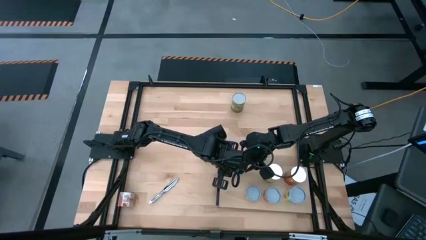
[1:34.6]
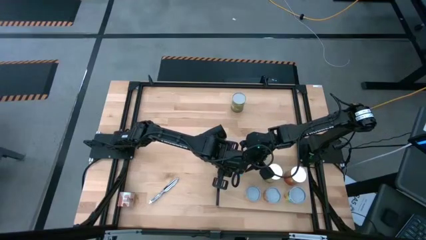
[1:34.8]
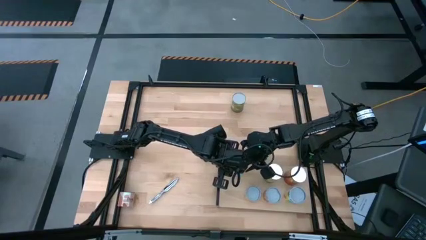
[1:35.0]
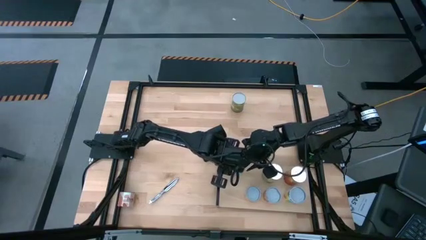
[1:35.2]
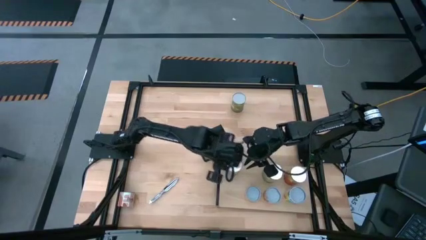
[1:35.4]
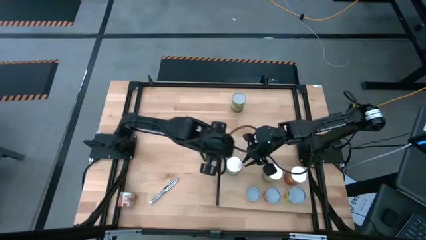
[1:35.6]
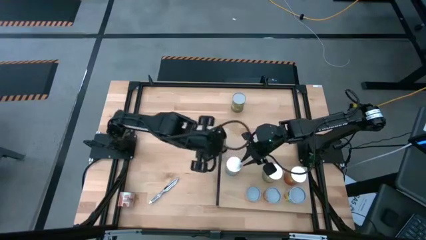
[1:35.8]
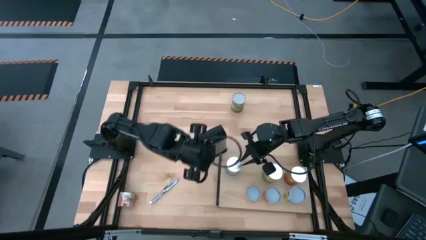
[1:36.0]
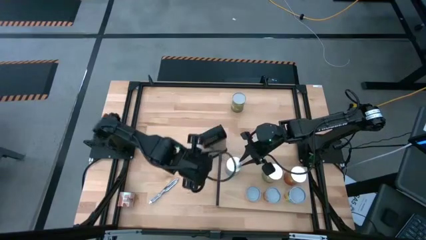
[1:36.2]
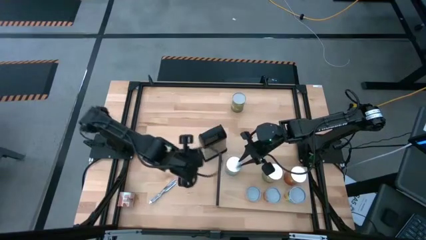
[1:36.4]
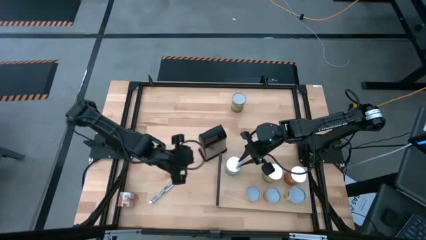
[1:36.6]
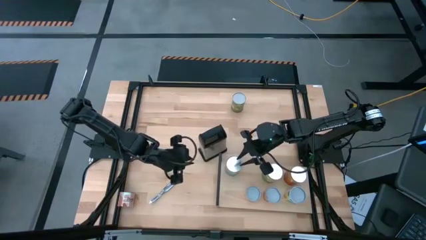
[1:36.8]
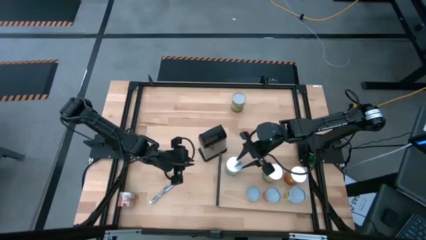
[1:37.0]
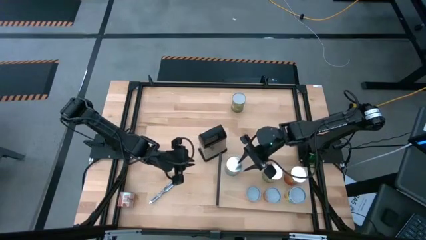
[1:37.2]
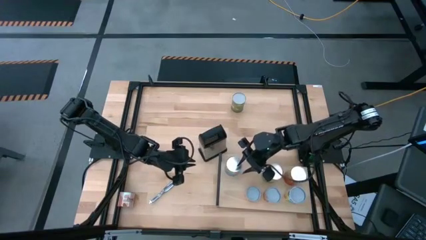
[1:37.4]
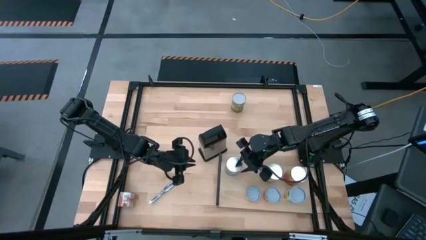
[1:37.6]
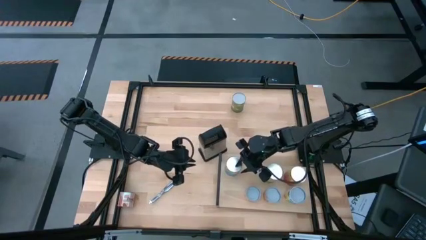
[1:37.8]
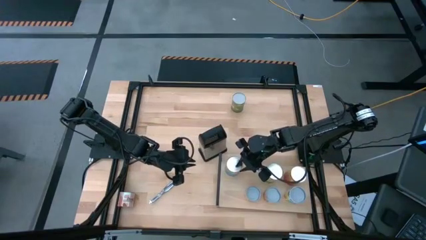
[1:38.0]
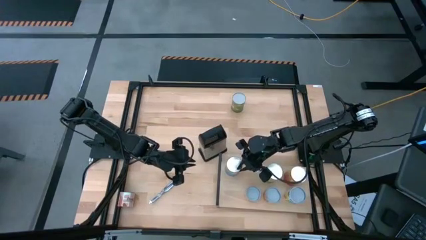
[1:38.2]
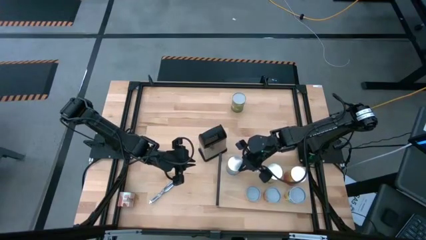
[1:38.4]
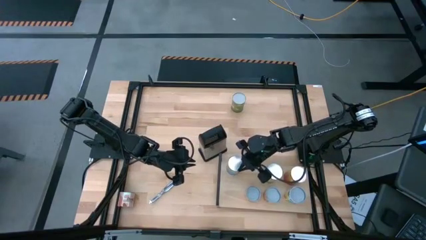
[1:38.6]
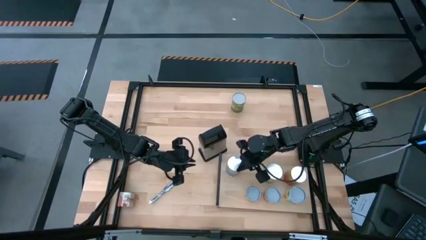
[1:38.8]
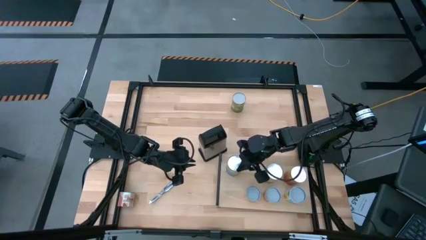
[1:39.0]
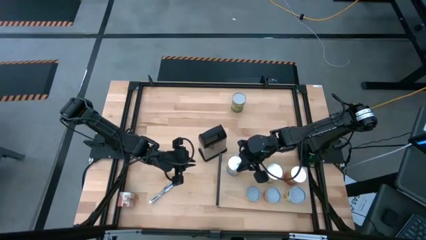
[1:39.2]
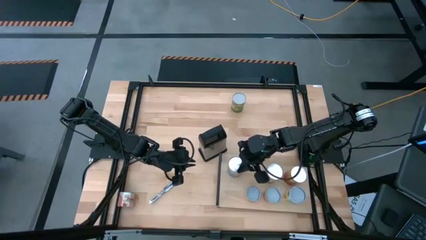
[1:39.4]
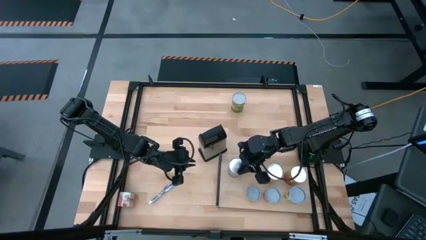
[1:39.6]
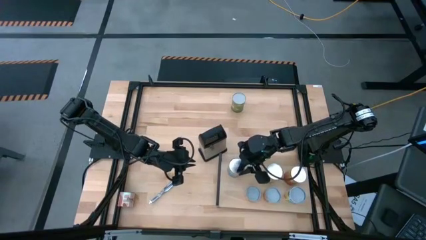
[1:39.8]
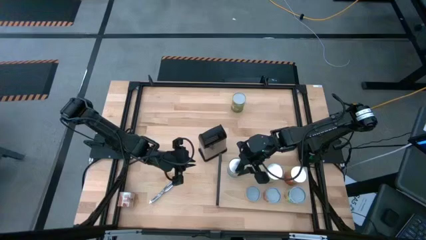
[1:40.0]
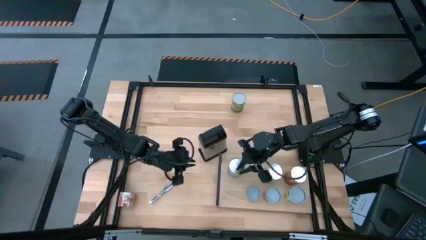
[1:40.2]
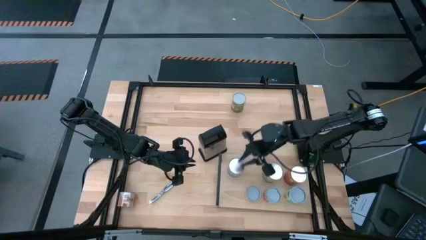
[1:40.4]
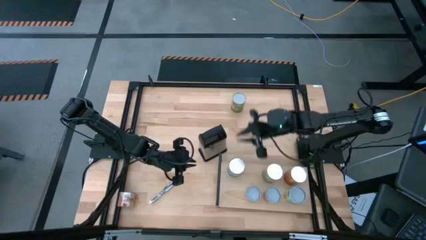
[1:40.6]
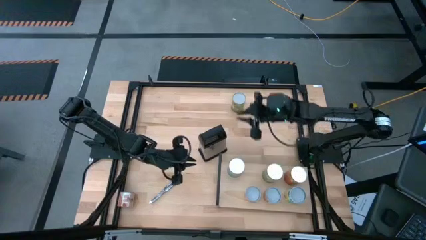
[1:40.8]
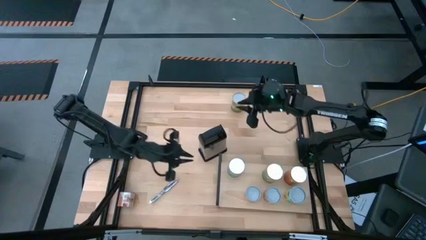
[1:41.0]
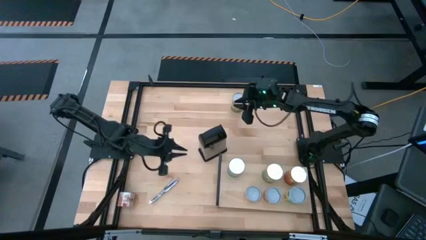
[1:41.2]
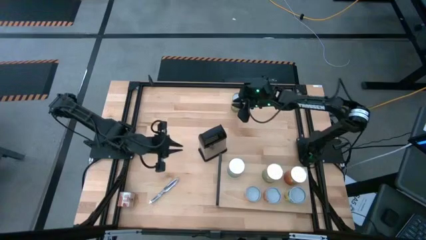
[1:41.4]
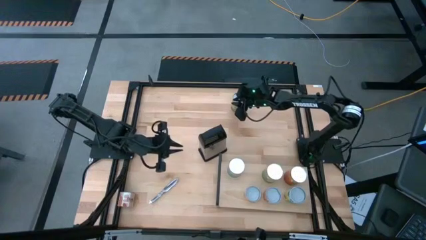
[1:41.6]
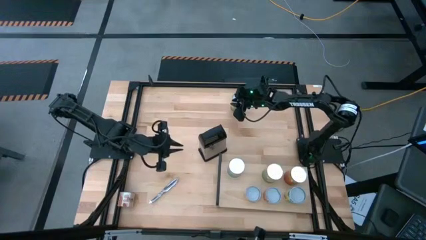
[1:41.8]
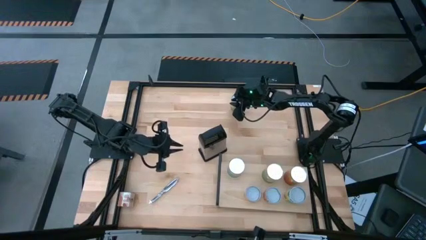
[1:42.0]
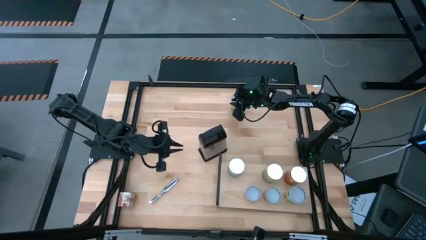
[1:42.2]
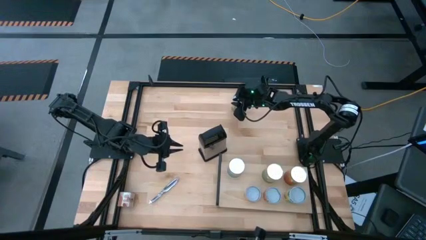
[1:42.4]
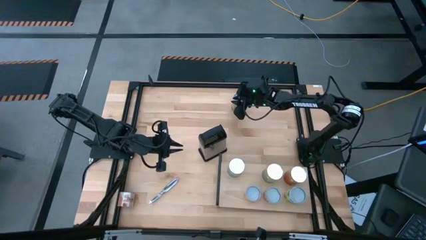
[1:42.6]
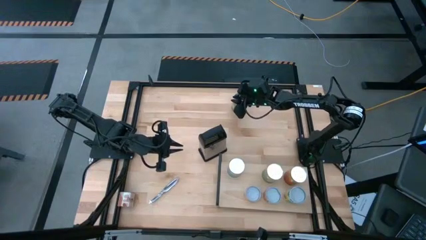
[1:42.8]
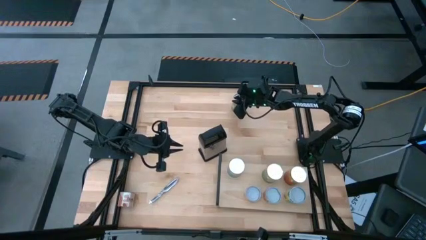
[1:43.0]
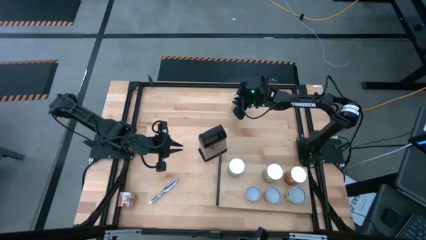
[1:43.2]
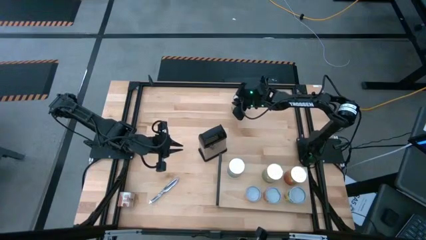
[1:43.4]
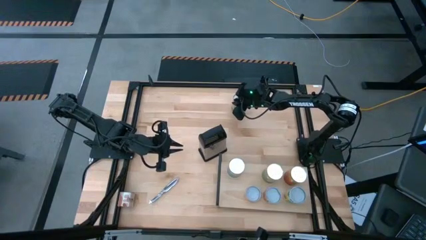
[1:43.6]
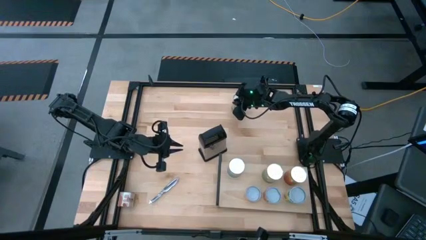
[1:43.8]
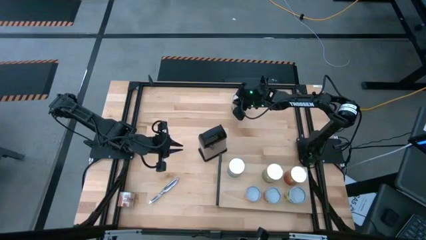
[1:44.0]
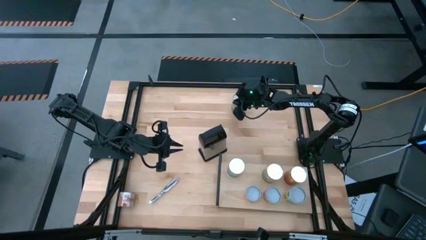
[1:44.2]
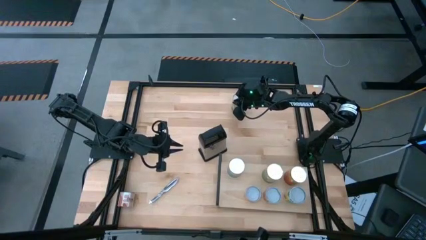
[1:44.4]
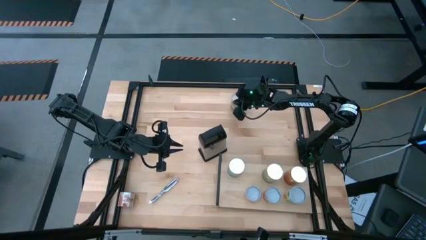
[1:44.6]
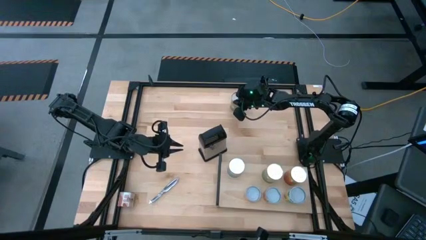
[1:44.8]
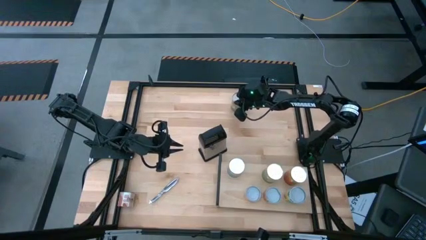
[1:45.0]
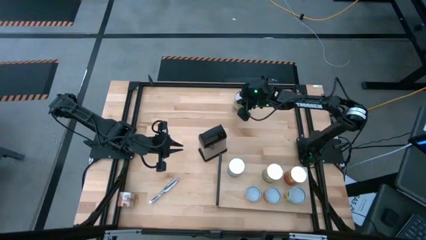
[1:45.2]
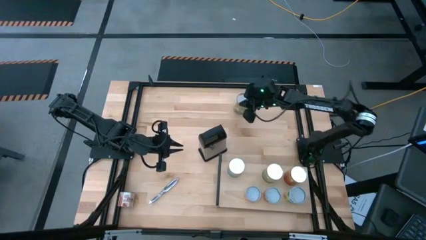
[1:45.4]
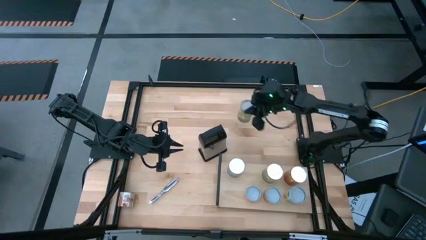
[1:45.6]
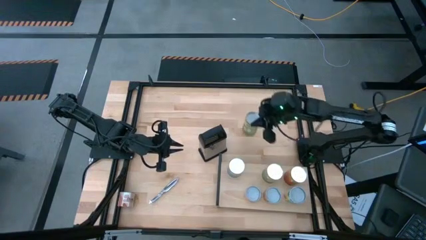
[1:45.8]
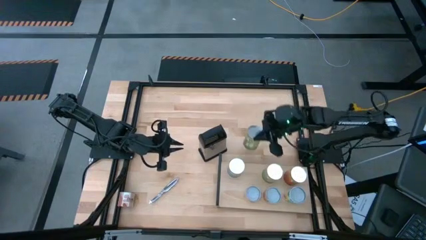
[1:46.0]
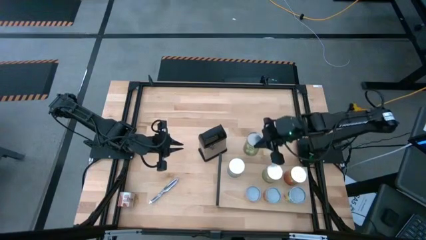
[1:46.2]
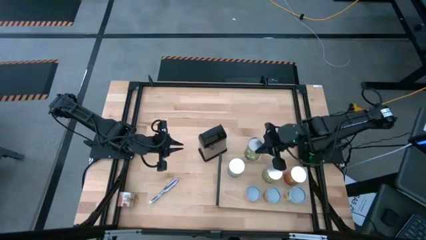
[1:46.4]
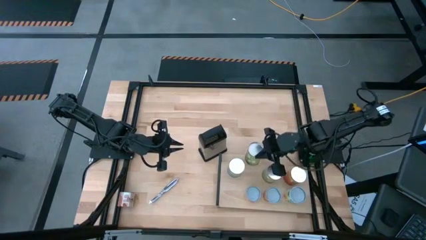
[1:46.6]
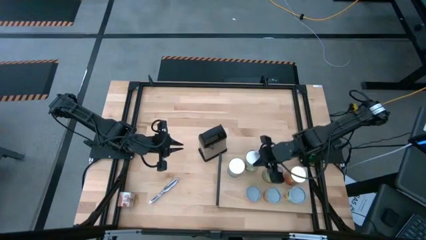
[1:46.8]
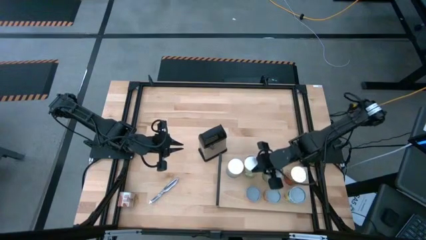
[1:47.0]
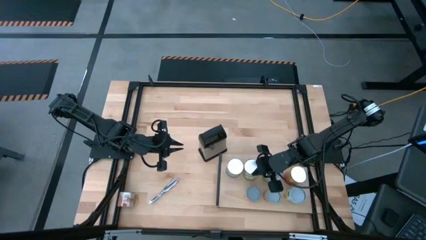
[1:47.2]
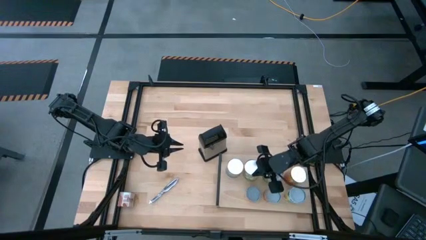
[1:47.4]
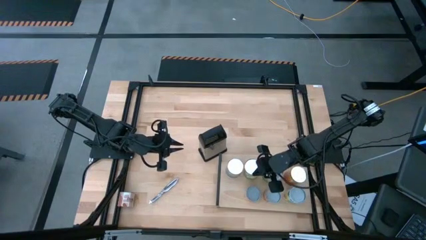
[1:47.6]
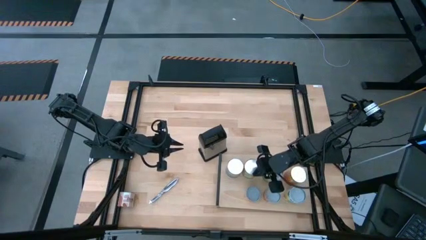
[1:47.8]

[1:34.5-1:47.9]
Task: Pick and place cans onto a shelf
Put the canned pears on the shelf

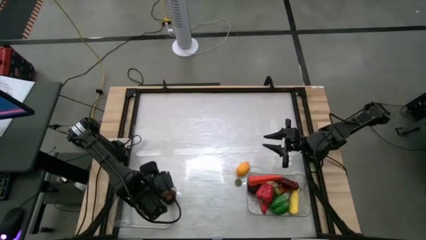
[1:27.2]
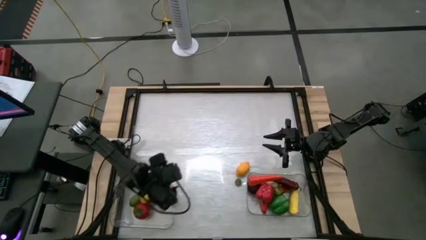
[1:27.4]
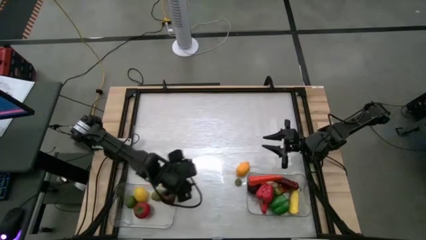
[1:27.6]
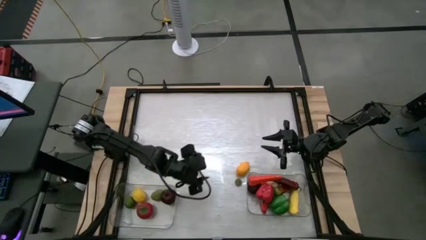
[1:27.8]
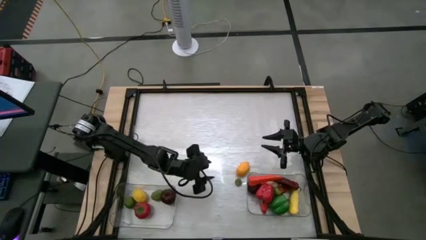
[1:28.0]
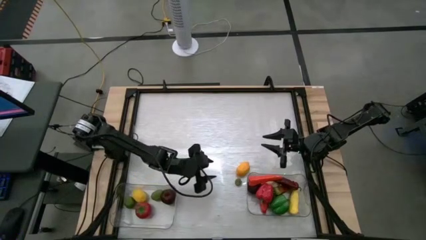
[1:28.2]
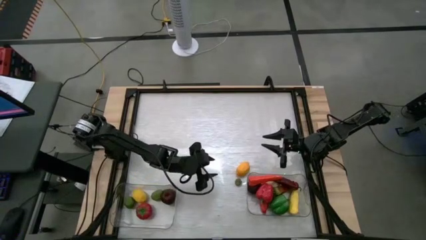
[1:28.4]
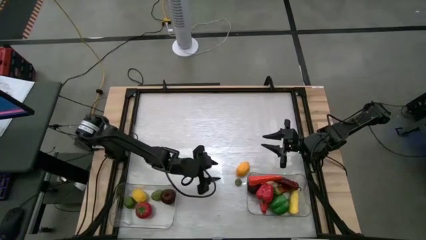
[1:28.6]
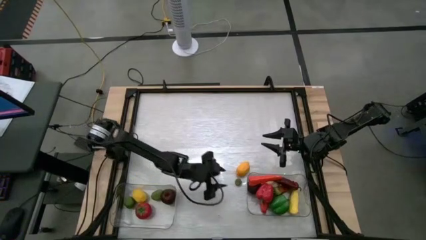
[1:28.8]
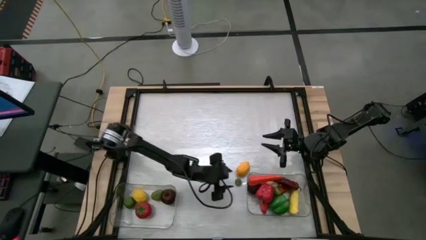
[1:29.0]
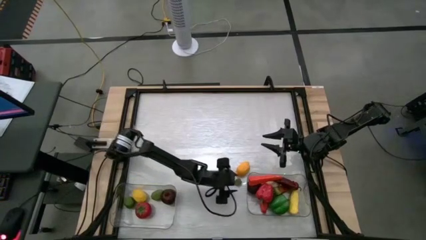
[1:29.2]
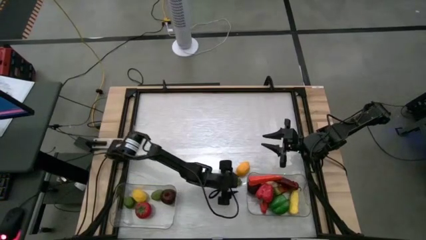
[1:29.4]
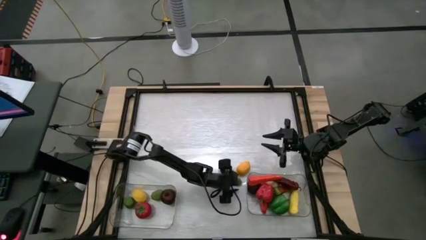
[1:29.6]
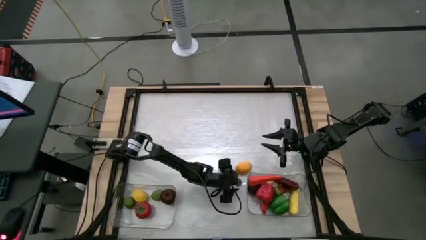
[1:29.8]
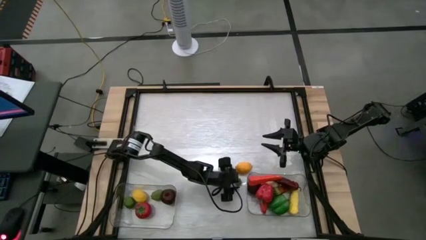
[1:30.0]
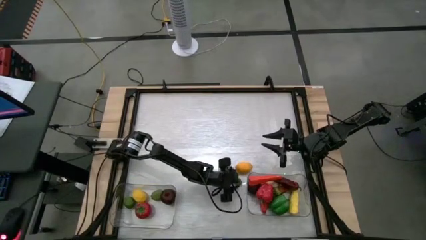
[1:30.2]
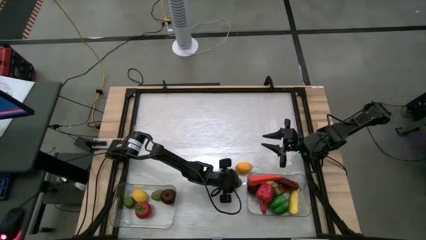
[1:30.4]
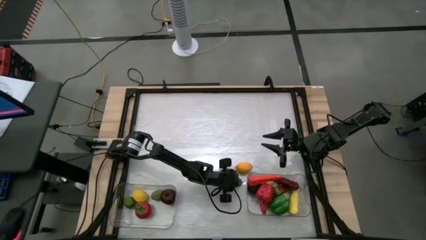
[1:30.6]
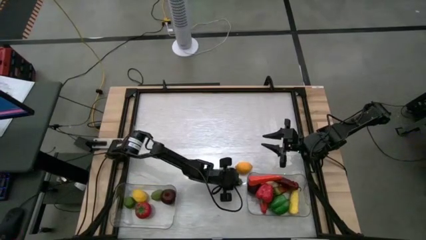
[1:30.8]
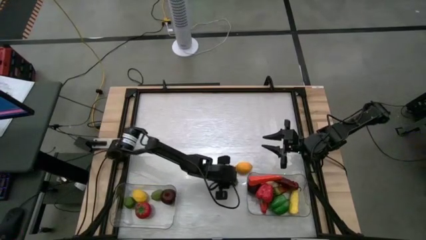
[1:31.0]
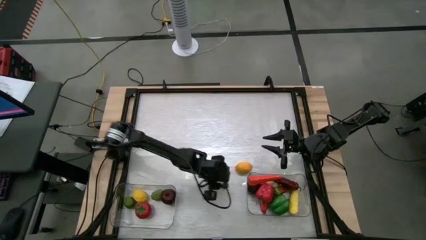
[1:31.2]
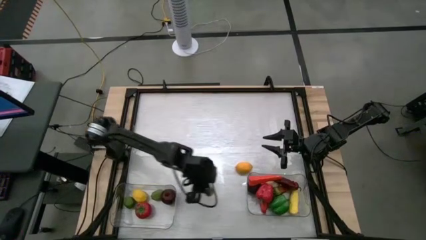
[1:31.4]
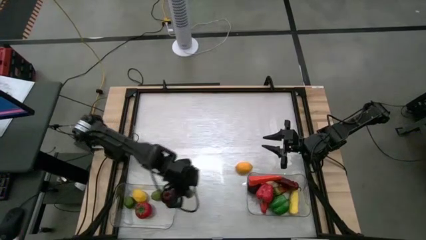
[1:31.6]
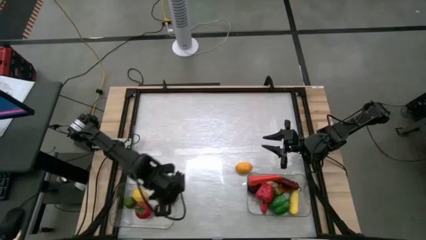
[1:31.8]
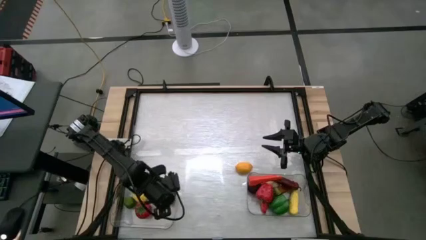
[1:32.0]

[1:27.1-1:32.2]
Task: Sort produce into baskets
Put the strawberry into the left transparent bin
